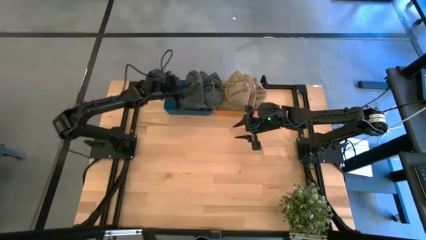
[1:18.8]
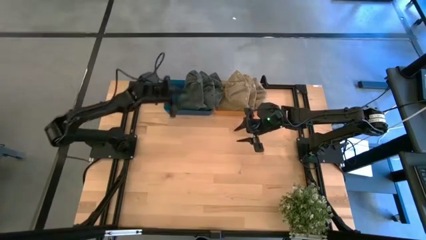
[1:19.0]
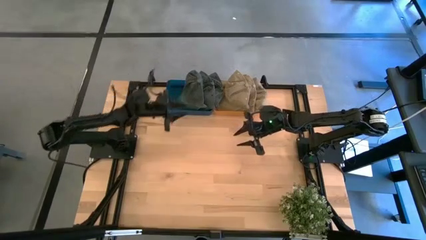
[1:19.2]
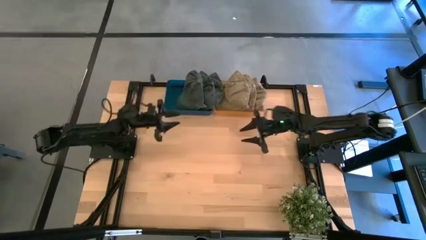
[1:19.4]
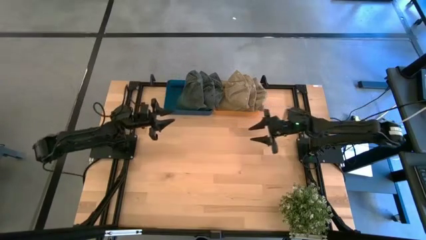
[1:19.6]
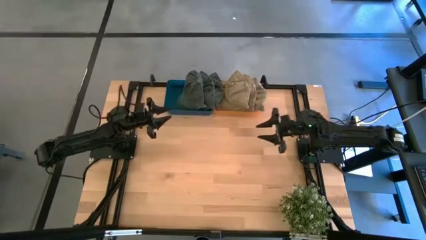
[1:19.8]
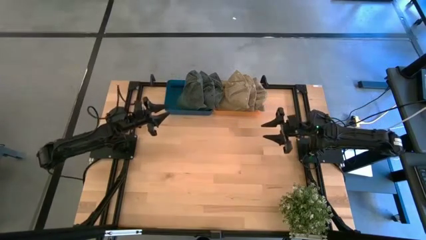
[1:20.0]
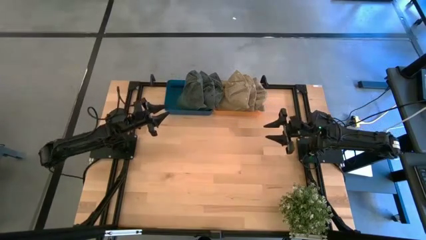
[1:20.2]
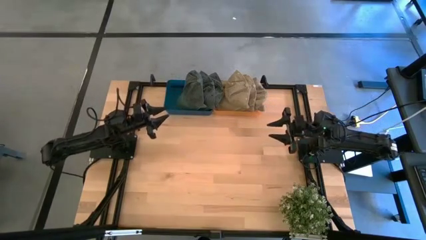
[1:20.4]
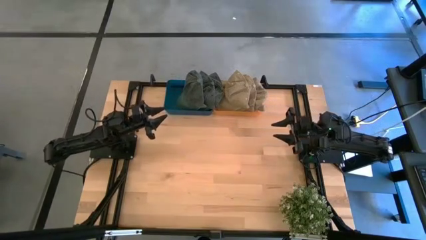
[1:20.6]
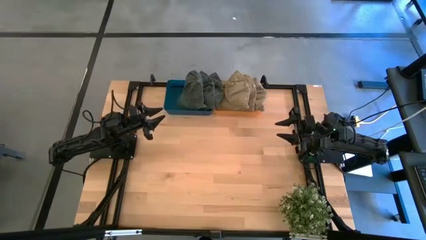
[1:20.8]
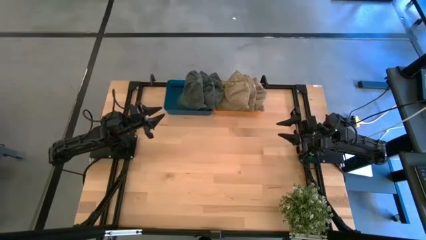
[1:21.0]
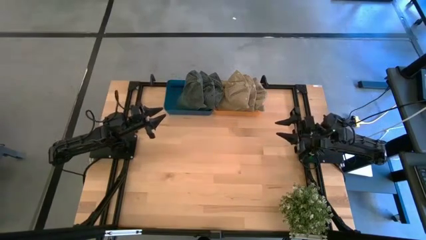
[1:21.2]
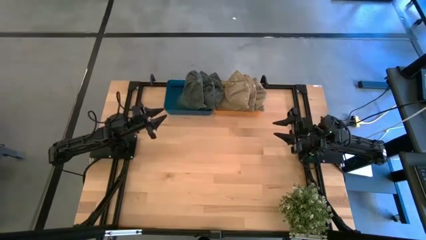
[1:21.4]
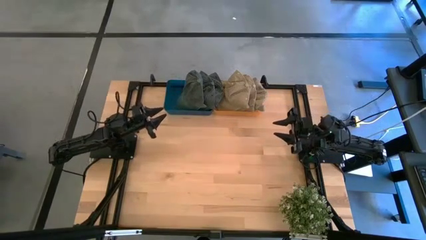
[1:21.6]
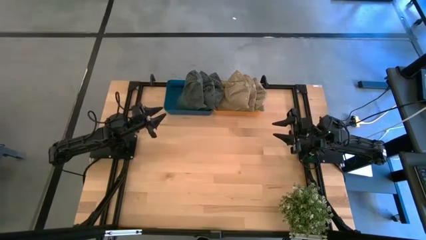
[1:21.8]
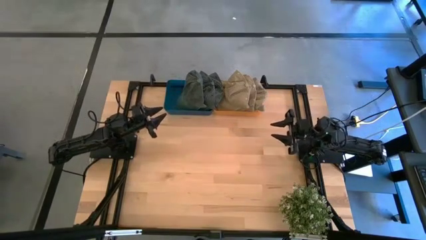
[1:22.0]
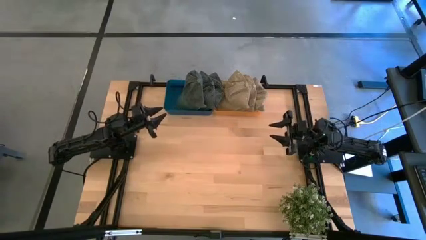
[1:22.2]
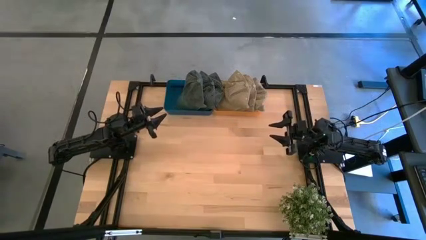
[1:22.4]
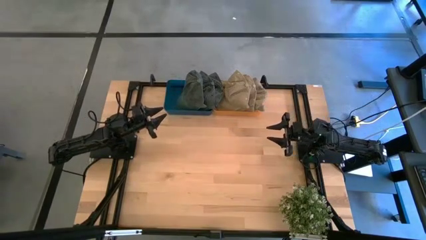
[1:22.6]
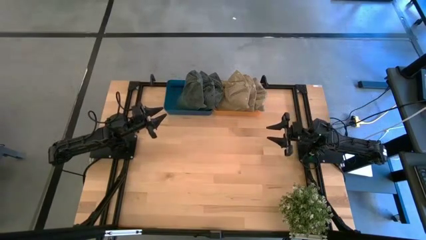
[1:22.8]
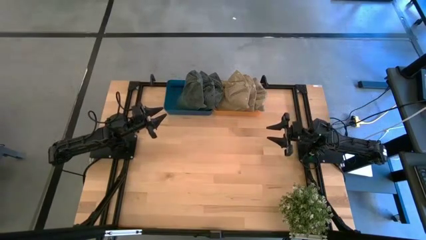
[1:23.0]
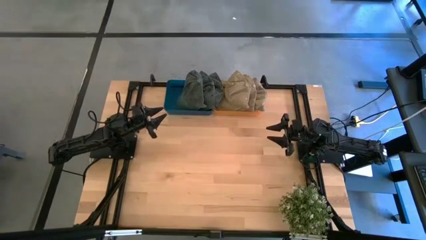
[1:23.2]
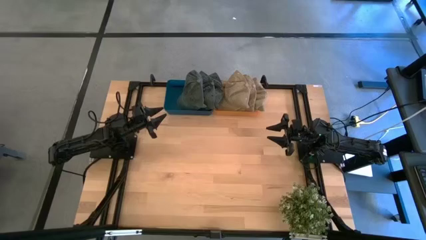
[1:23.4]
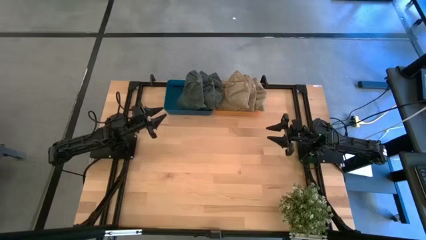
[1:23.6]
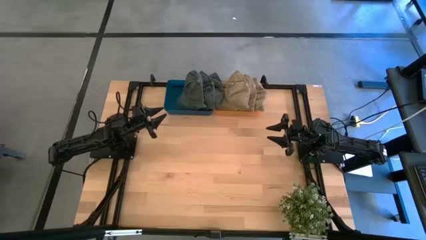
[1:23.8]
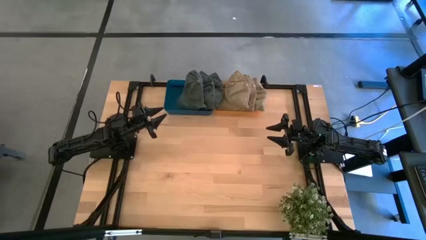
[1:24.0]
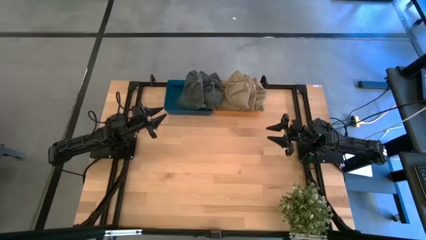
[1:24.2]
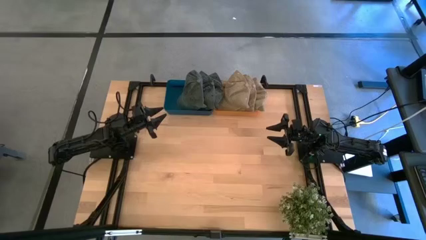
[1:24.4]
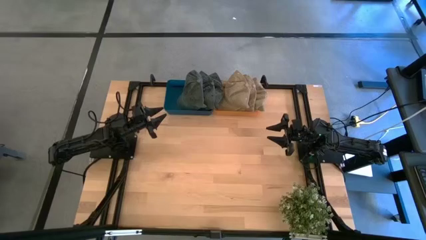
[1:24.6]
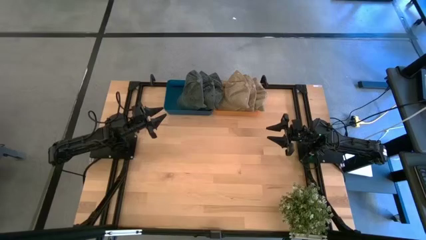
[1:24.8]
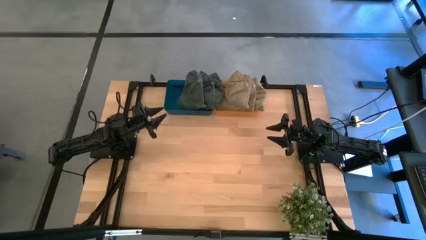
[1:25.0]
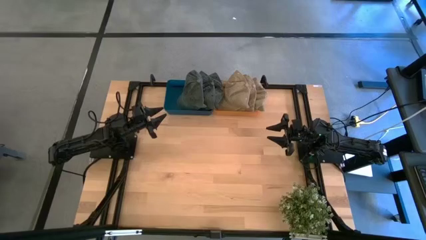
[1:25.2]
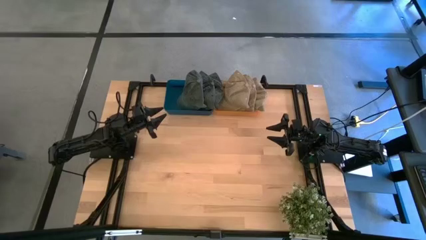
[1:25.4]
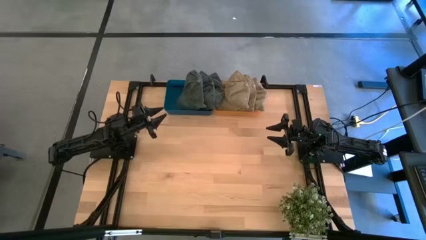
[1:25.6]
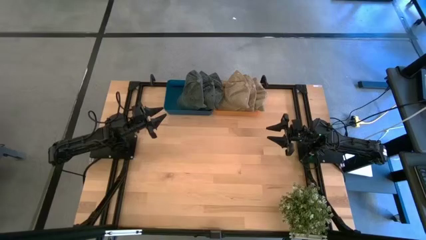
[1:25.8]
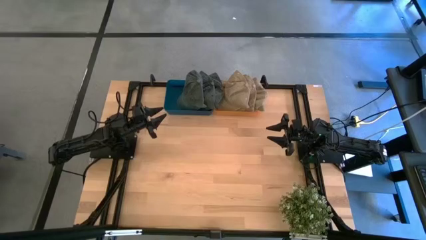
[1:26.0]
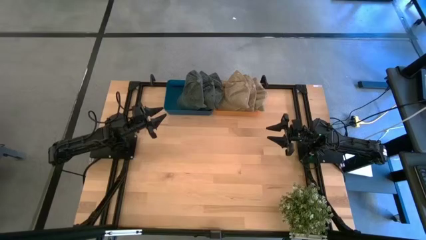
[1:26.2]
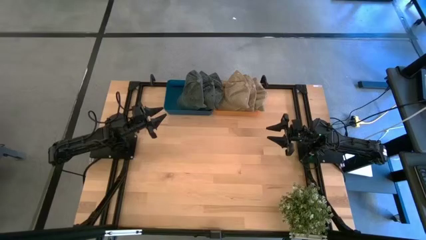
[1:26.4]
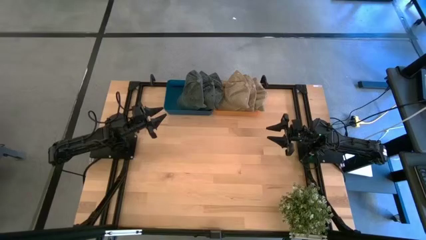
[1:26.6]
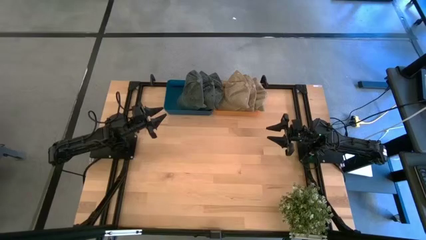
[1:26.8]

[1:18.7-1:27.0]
Task: Pick & Place hat
Return to Home Position

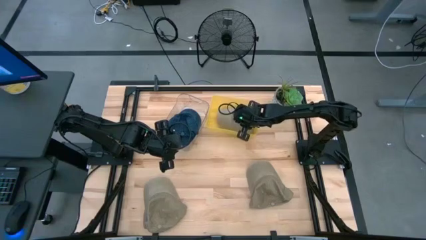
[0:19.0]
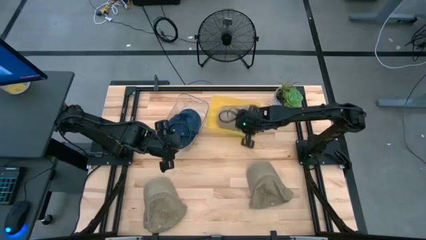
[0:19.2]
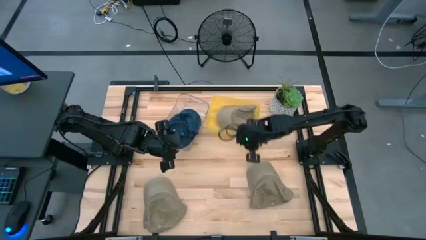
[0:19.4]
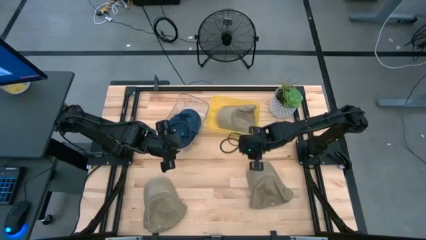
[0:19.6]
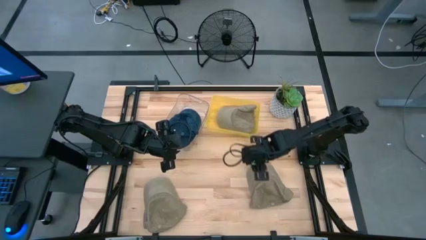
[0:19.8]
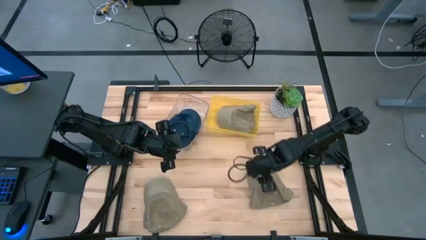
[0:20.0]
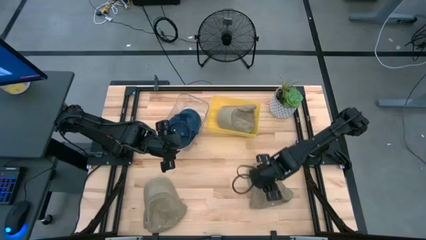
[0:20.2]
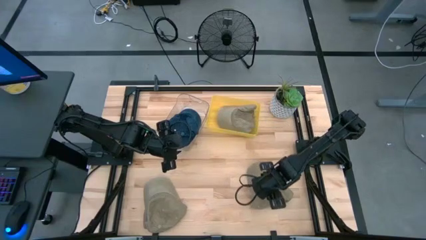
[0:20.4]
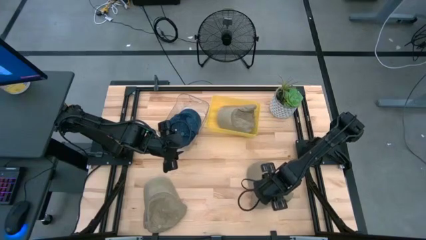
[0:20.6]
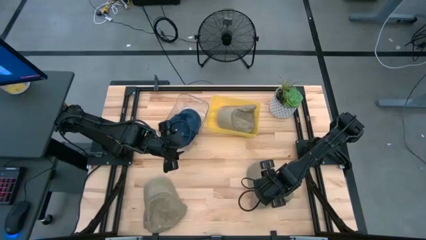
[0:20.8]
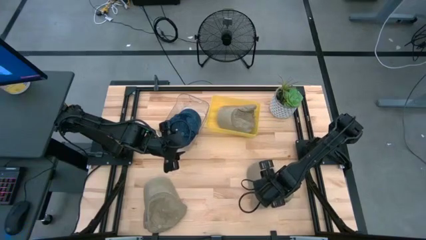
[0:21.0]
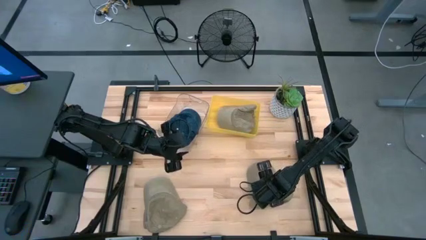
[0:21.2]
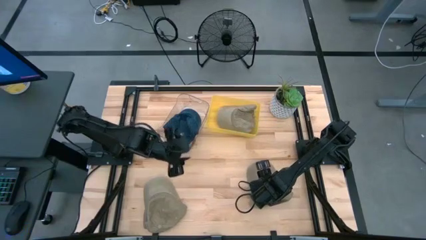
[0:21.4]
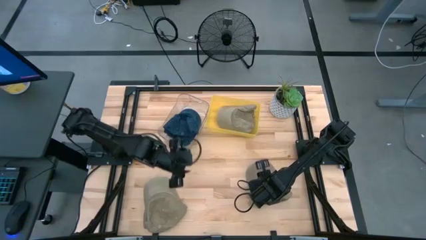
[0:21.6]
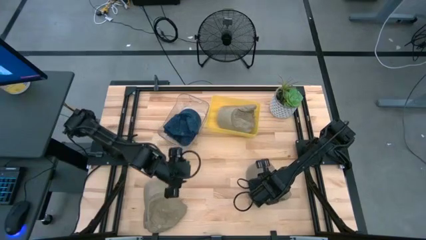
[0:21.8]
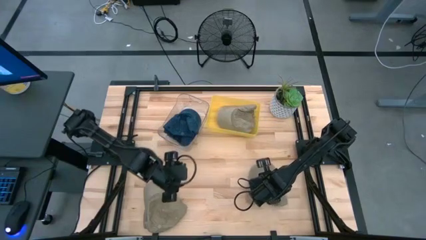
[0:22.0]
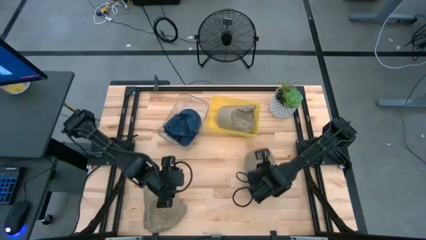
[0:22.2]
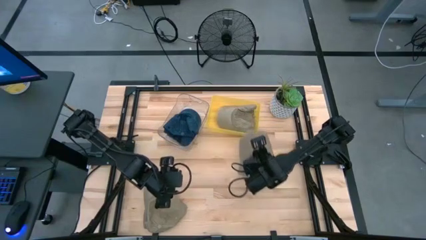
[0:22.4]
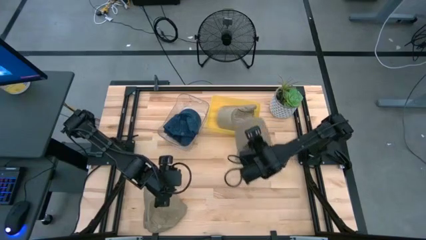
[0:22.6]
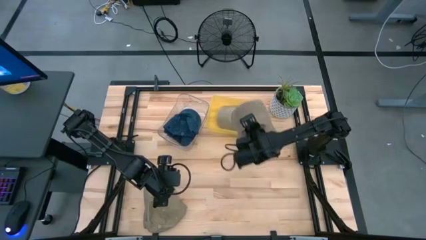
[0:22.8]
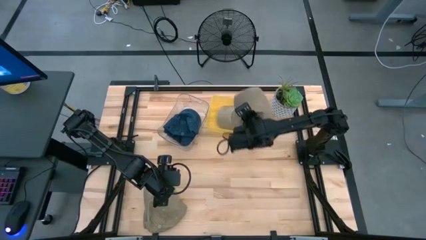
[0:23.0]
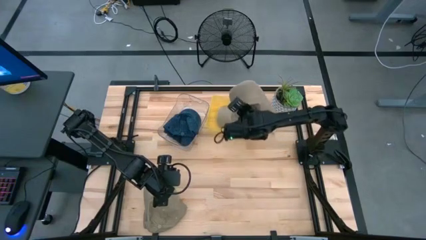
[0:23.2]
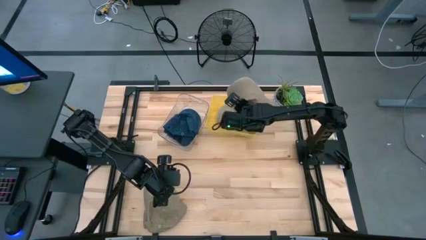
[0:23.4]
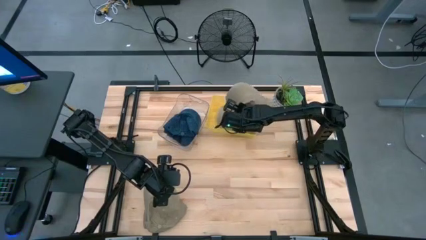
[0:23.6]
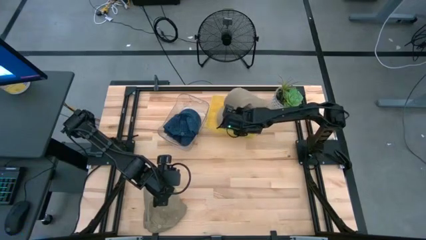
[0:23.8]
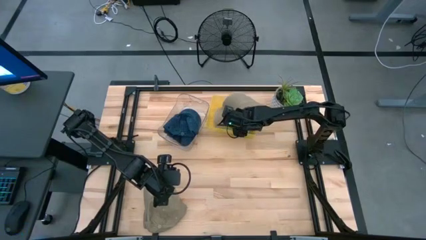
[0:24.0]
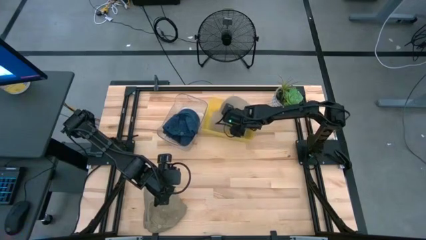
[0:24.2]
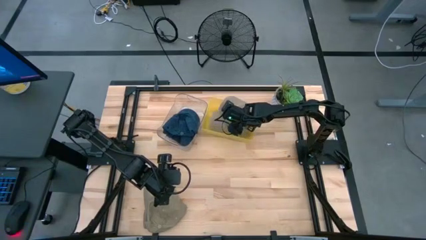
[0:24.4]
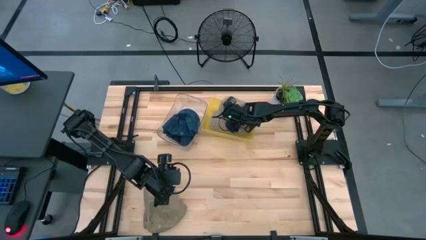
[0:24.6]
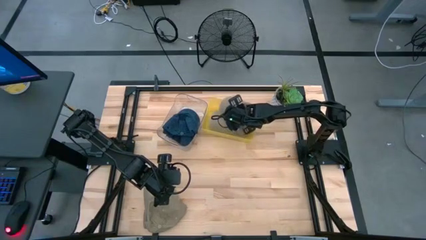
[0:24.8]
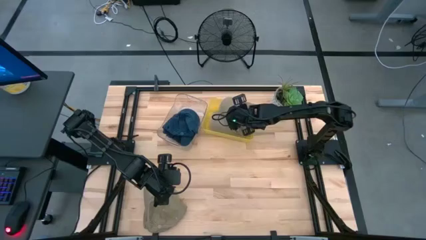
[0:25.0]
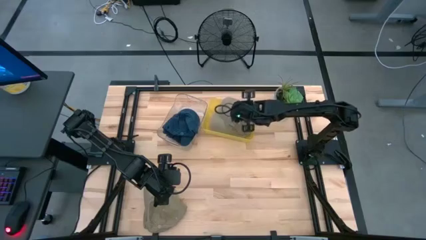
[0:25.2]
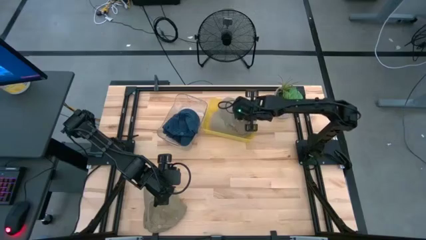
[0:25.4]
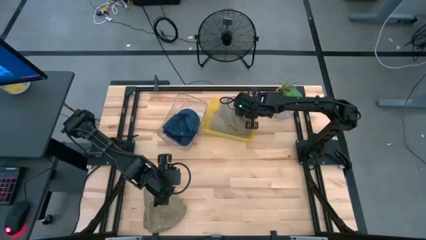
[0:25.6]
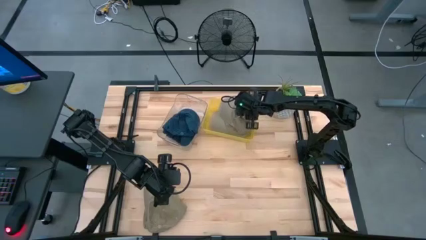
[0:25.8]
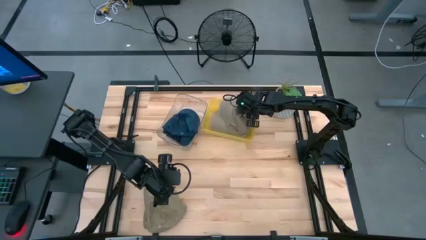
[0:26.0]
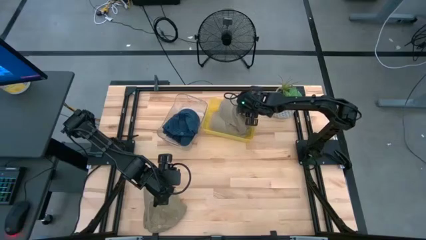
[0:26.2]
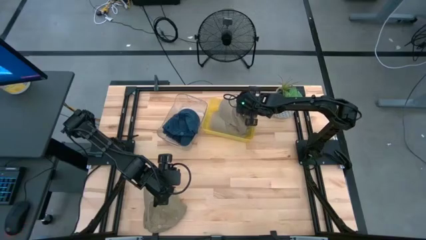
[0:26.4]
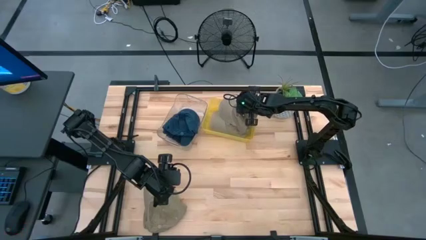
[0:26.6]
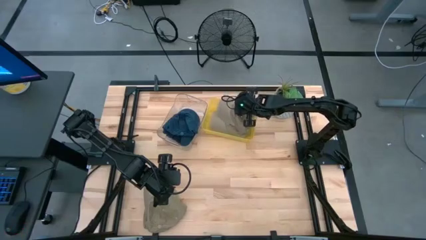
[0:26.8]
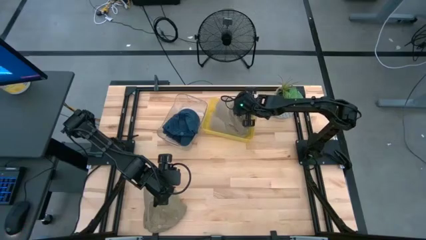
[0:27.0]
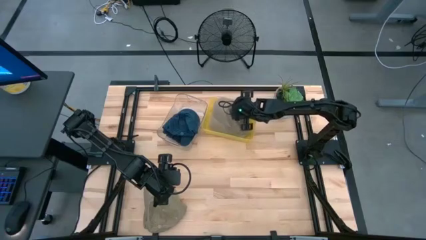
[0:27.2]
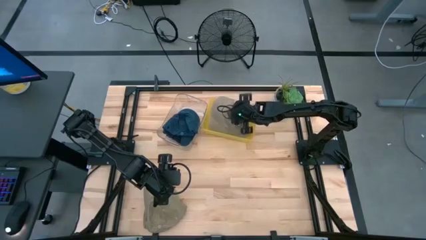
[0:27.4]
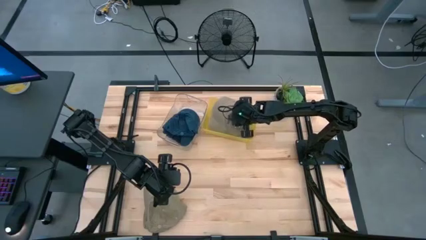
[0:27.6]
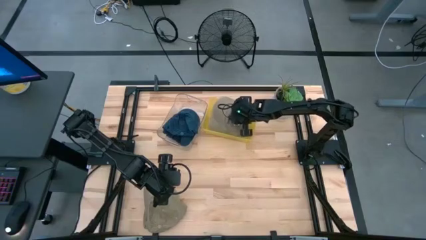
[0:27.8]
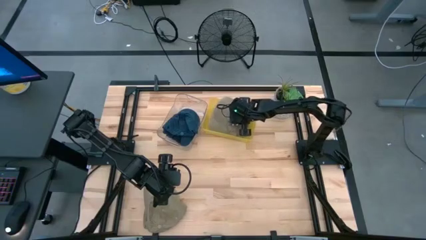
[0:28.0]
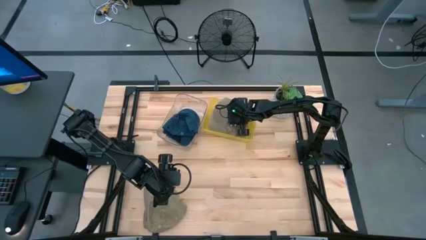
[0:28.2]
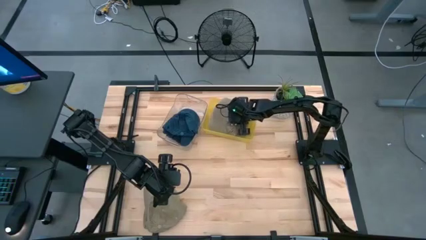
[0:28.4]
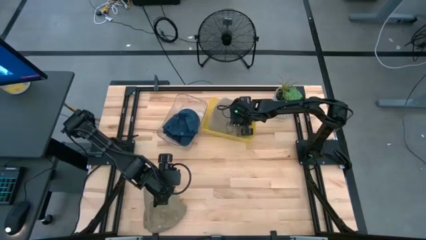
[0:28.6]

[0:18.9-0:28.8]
Task: Pick & Place hat
Put the right brown cap into the yellow bin
